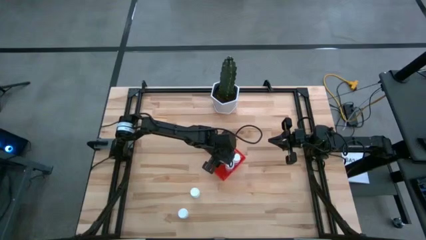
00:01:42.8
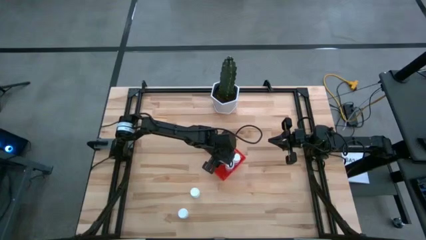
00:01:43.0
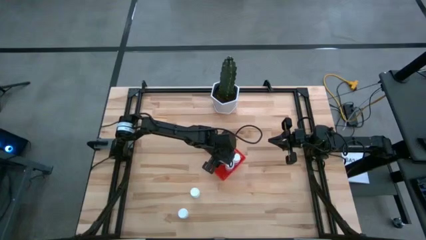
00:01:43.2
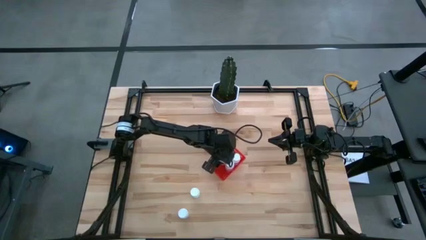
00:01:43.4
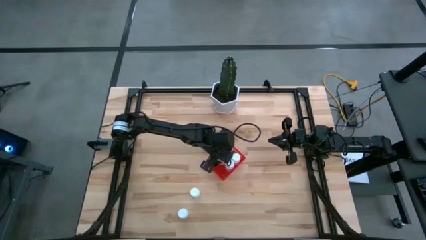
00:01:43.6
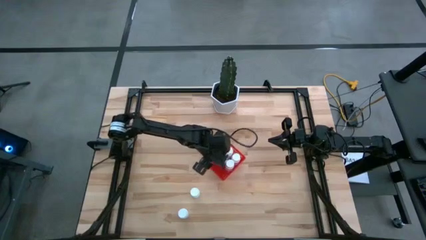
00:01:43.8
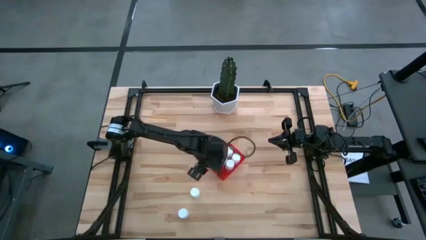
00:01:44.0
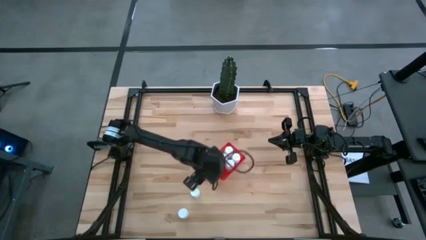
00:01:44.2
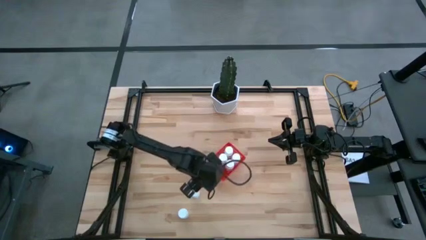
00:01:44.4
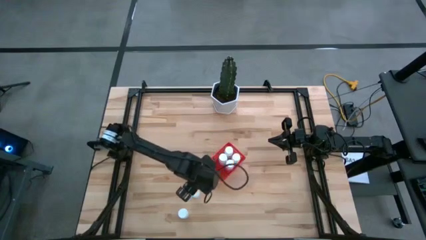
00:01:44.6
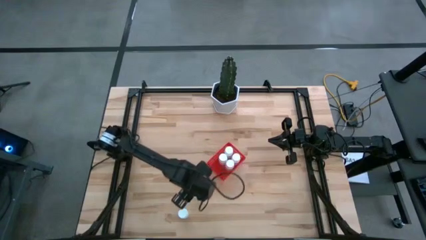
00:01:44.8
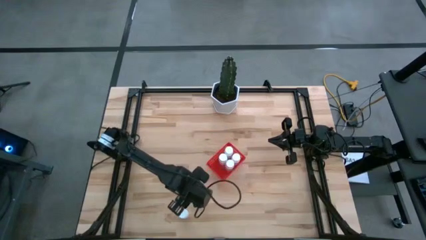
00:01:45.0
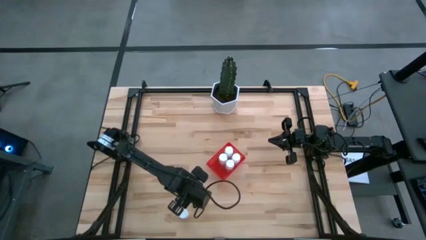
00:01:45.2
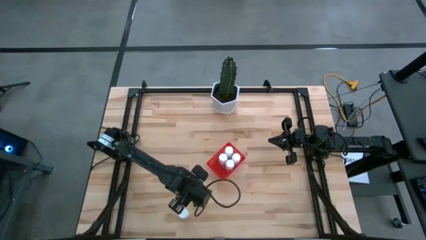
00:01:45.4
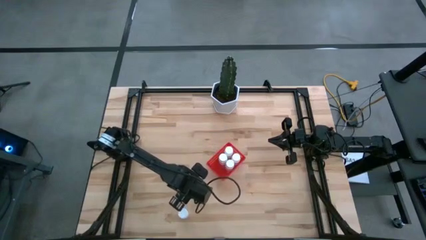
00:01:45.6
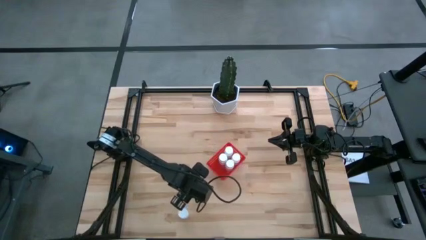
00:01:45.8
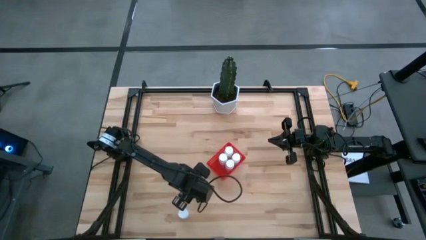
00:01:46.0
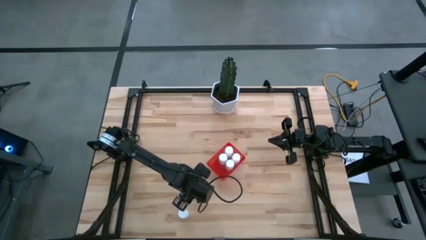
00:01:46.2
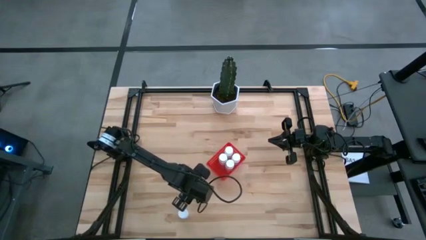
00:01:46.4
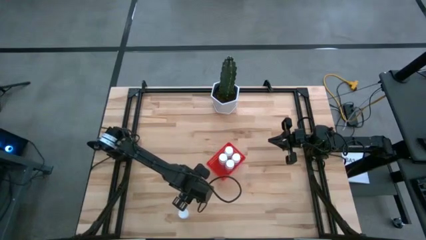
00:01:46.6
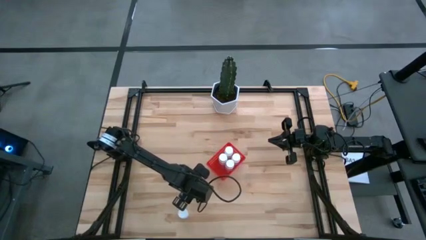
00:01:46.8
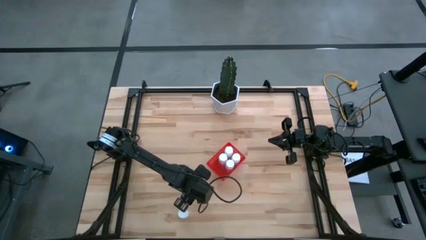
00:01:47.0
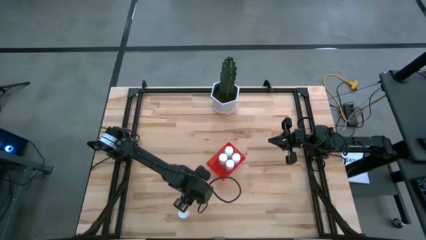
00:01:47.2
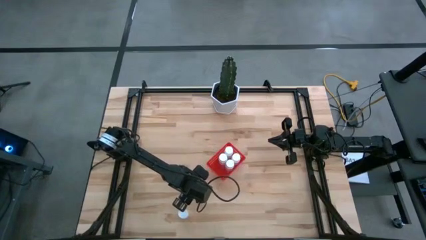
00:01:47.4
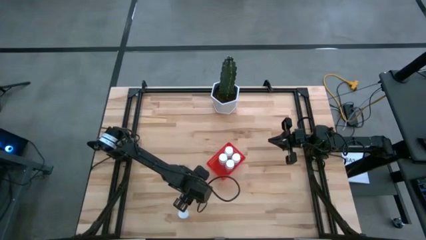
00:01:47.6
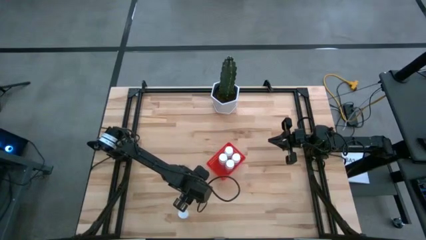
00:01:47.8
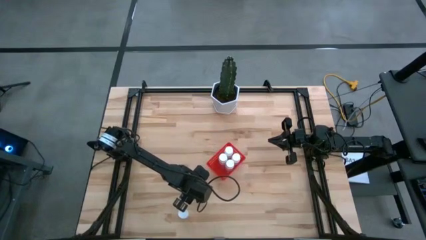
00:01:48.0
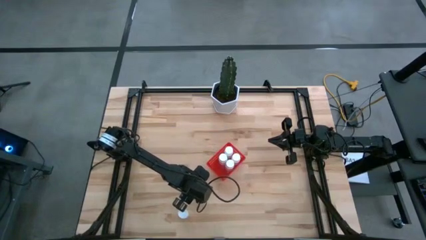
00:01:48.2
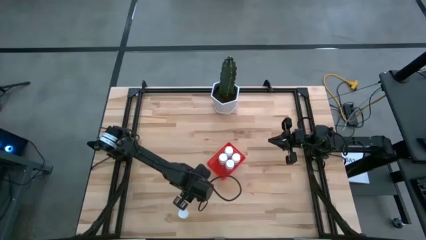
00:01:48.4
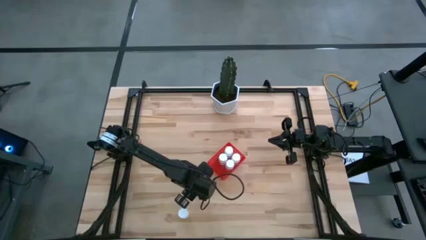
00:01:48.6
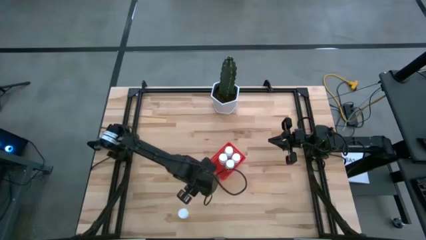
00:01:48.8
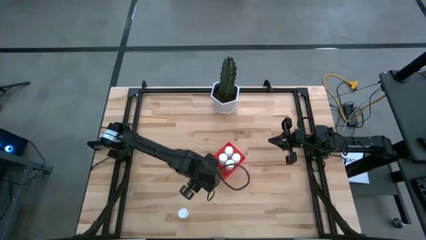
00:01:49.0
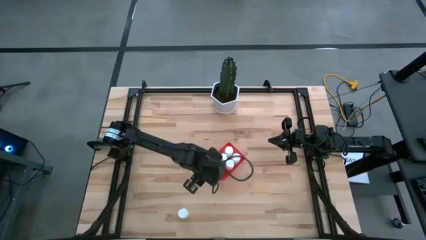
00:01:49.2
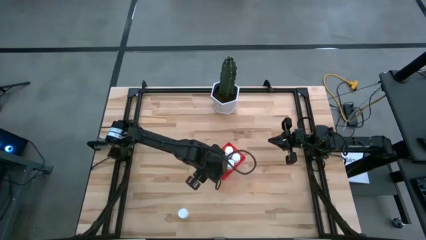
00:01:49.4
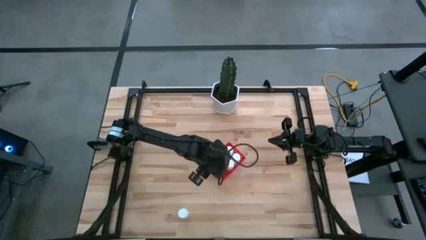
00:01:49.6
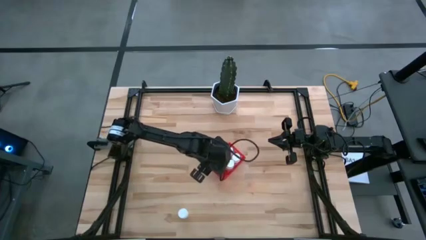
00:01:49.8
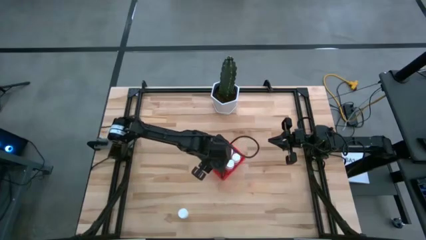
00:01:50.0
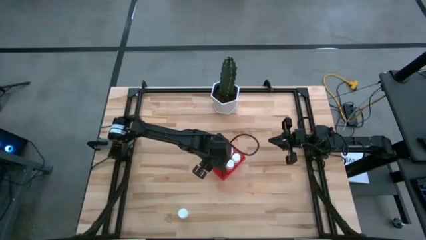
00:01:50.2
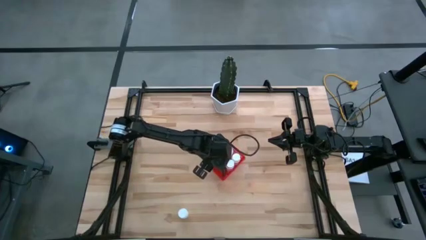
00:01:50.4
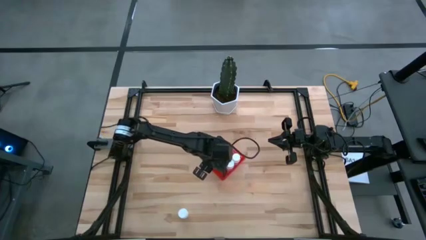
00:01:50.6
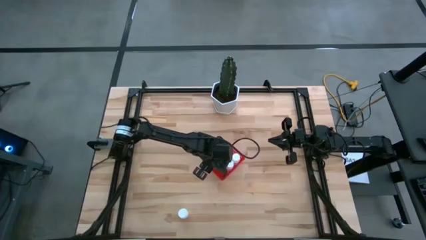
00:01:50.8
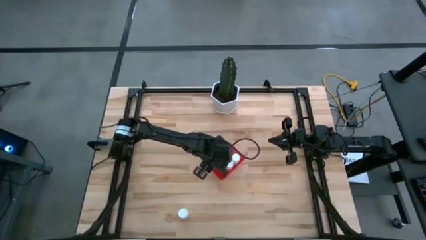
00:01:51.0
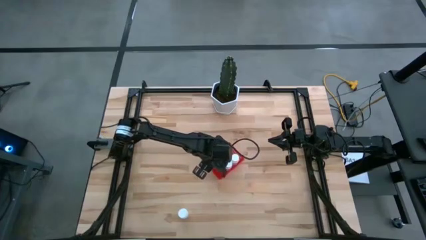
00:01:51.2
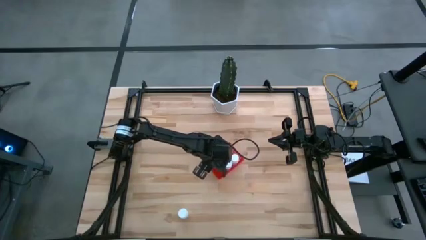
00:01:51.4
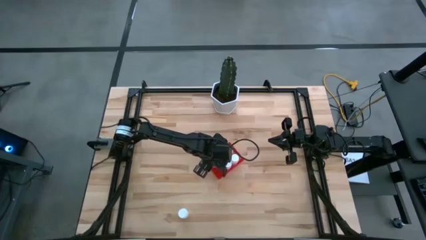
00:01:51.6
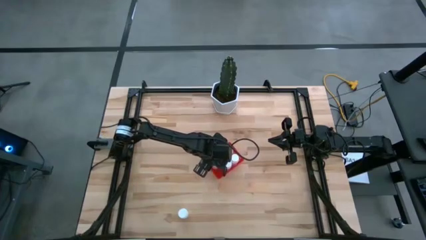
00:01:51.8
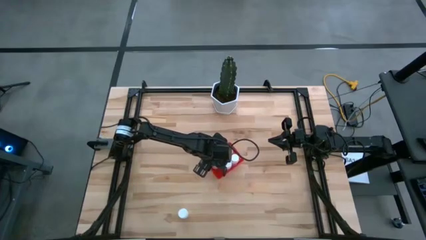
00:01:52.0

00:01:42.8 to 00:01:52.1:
Task: Pick and place pill bottles into a basket
Put the white pill bottle into the red bin

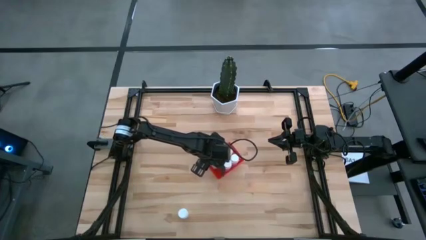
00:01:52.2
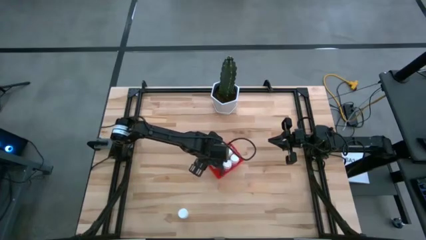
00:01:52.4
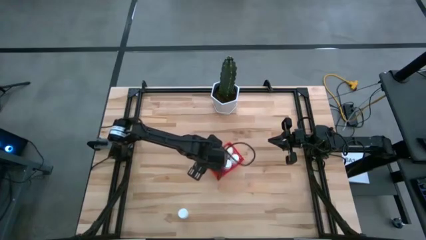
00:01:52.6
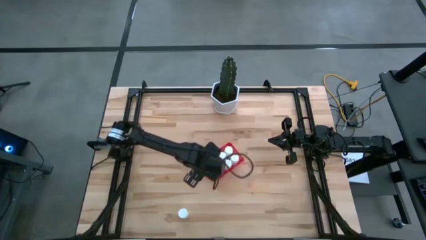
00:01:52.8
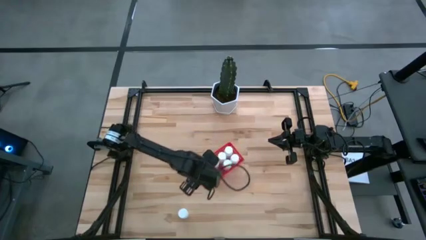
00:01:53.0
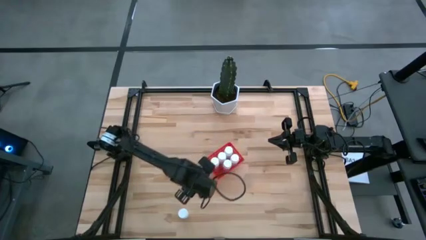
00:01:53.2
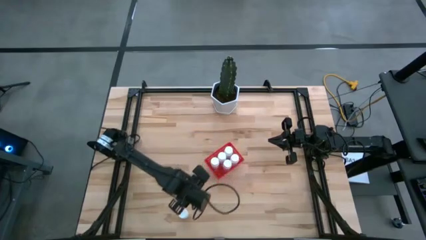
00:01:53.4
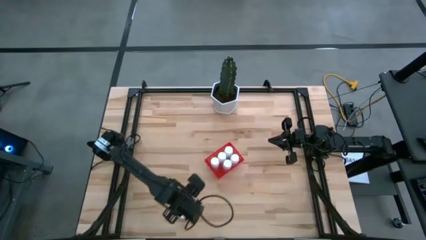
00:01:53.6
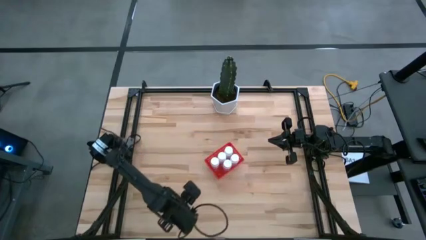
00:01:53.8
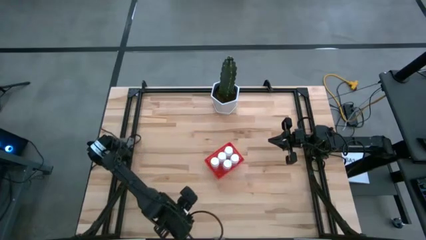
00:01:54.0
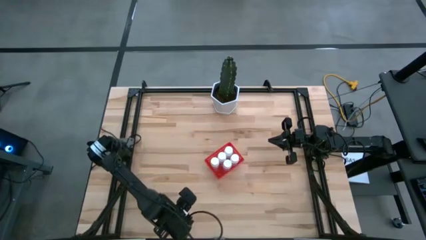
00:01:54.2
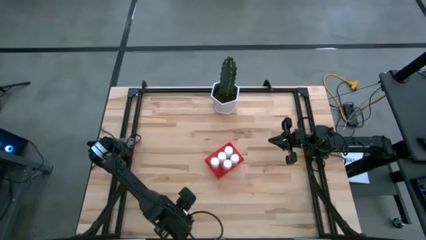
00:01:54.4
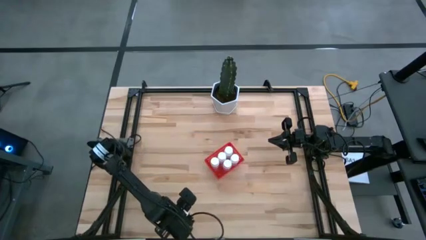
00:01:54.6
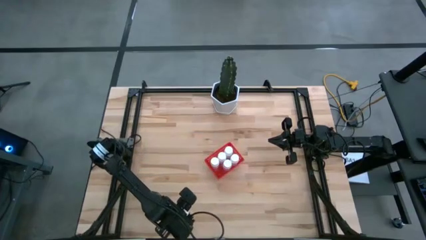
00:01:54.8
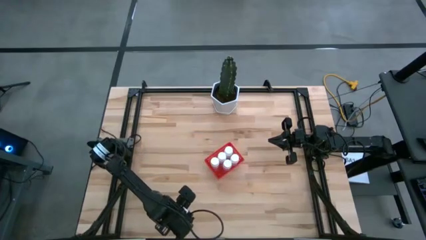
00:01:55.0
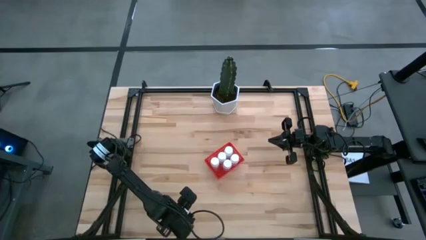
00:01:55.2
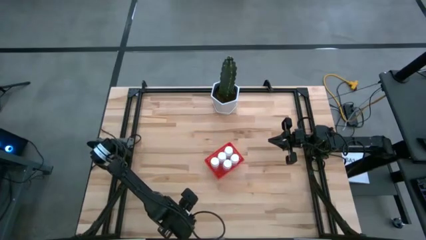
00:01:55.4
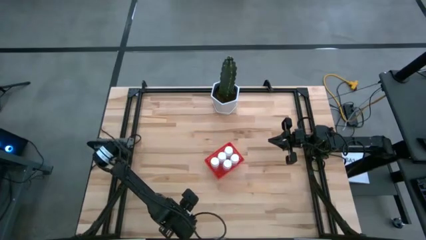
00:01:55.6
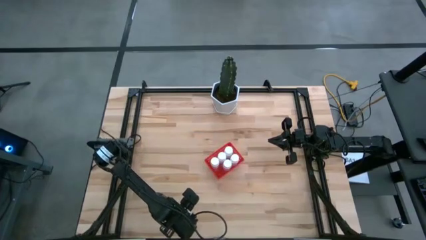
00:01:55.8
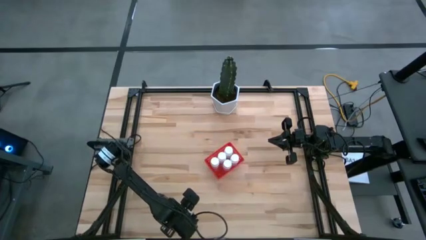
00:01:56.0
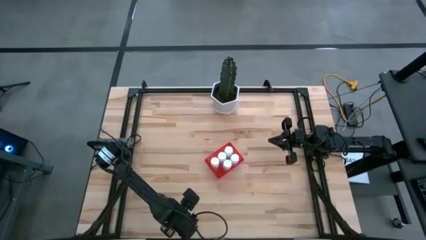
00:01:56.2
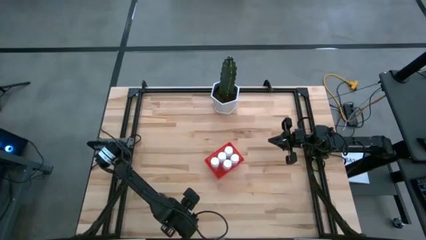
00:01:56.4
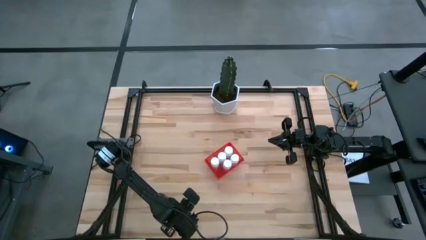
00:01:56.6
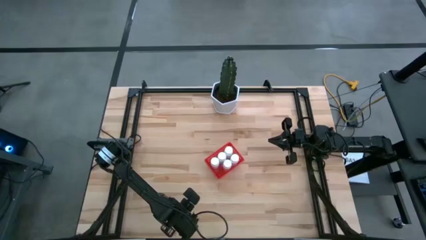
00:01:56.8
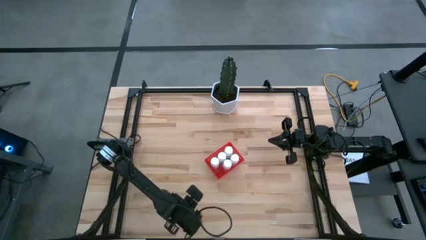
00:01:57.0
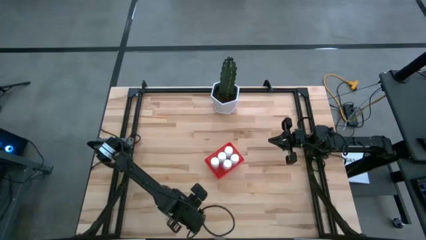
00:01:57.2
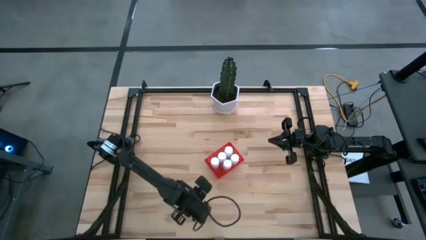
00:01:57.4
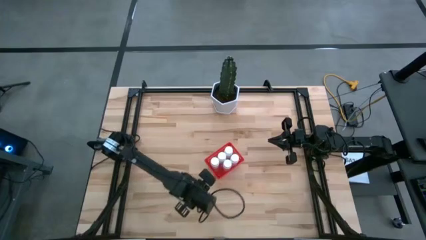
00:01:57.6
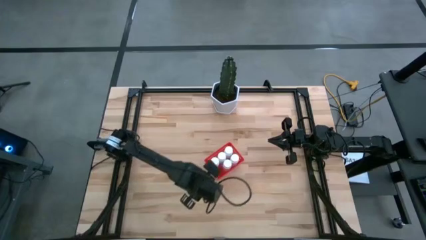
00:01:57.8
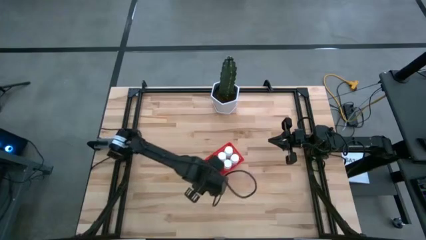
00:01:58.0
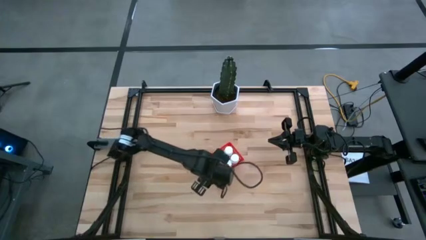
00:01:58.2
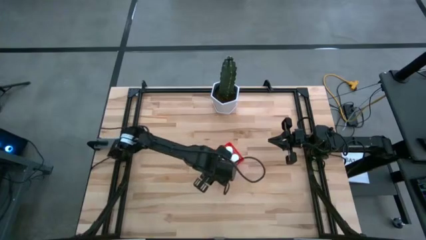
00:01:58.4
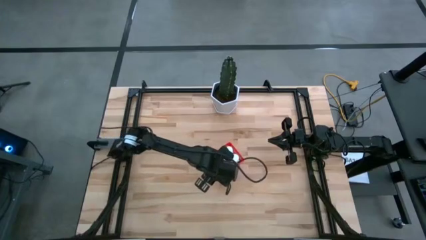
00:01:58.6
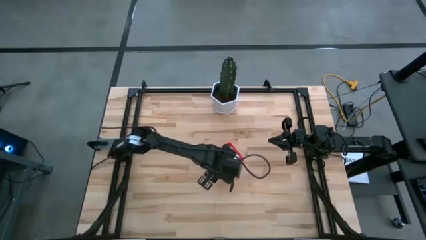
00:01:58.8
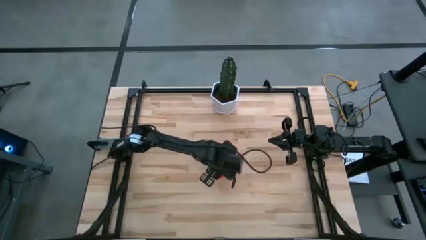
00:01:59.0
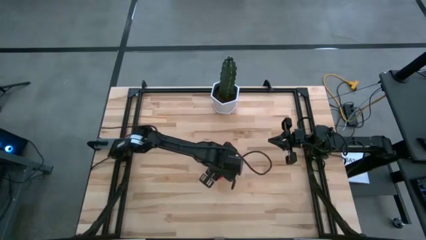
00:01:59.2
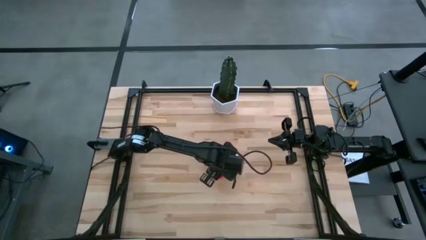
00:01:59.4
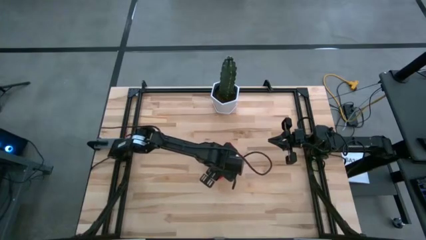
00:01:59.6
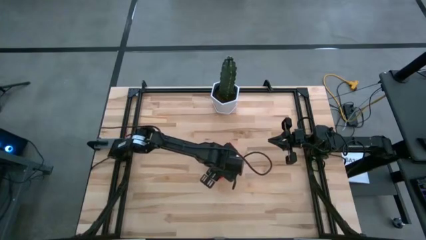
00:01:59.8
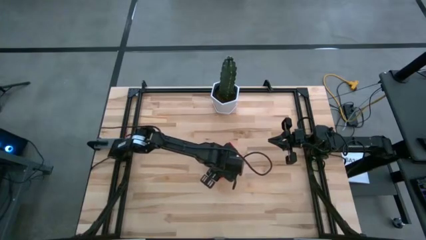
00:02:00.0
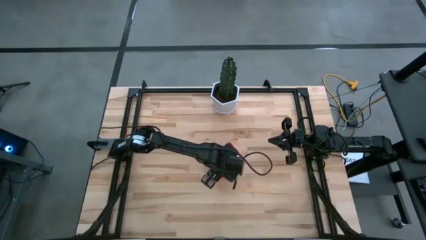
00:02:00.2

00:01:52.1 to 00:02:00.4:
Put the white pill bottle into the red bin
